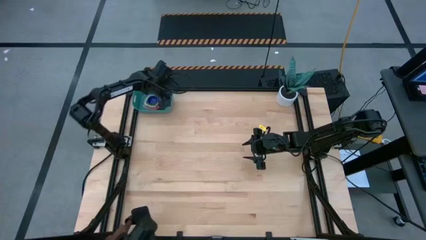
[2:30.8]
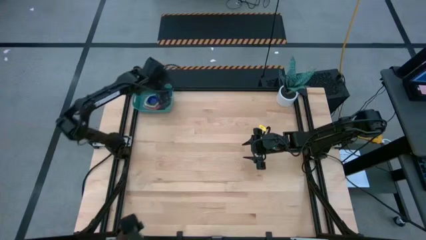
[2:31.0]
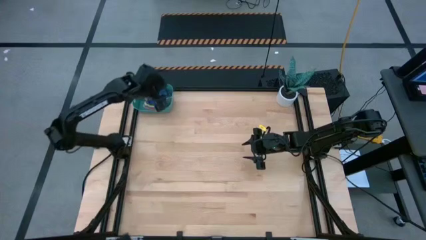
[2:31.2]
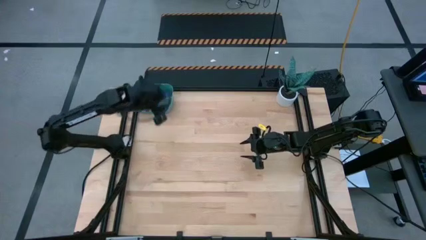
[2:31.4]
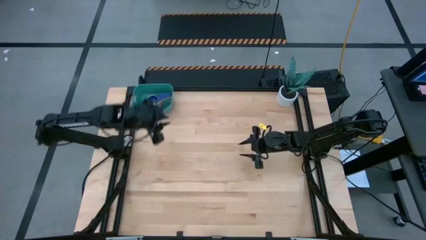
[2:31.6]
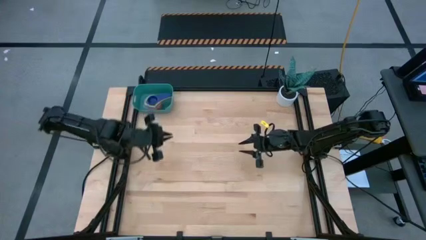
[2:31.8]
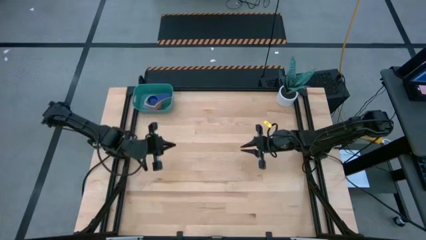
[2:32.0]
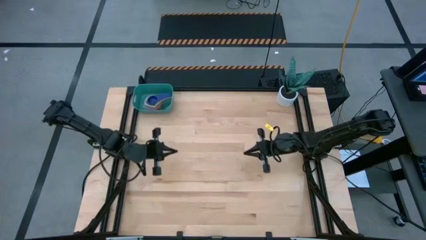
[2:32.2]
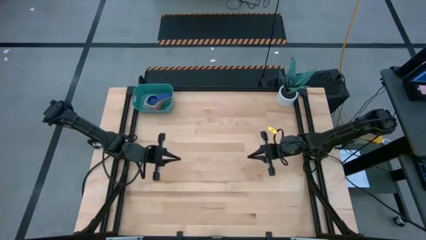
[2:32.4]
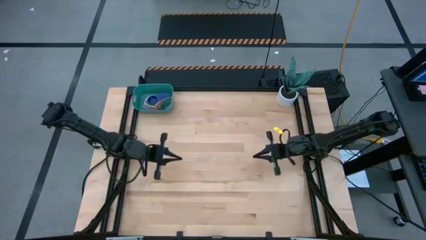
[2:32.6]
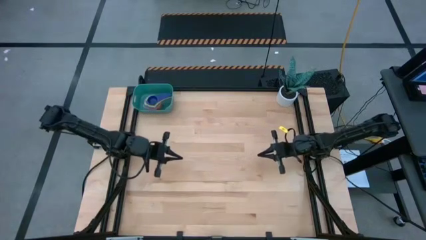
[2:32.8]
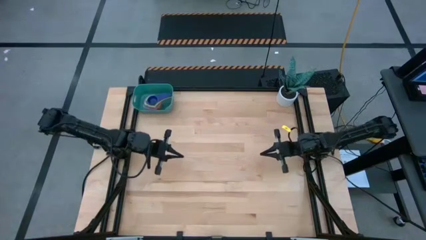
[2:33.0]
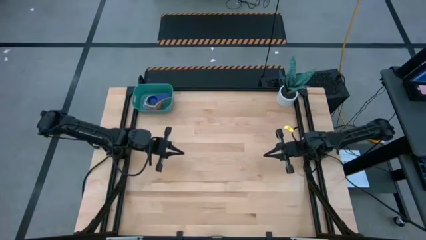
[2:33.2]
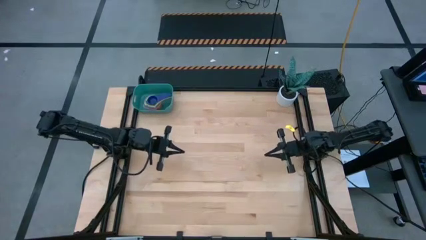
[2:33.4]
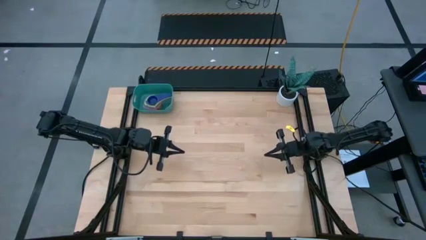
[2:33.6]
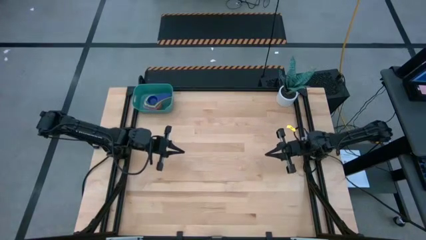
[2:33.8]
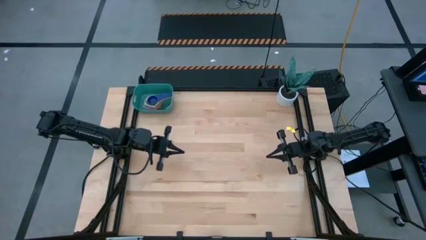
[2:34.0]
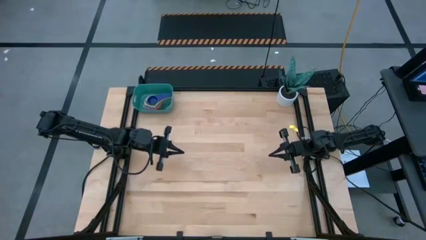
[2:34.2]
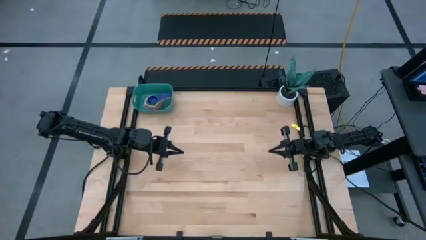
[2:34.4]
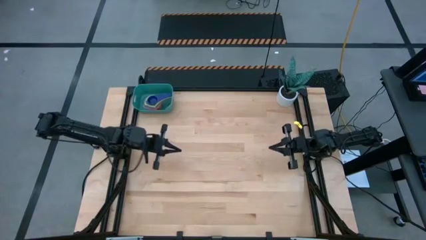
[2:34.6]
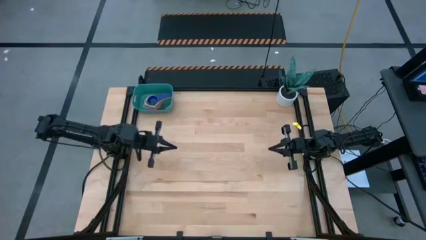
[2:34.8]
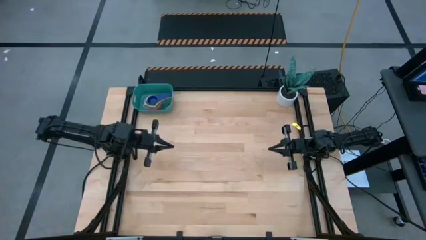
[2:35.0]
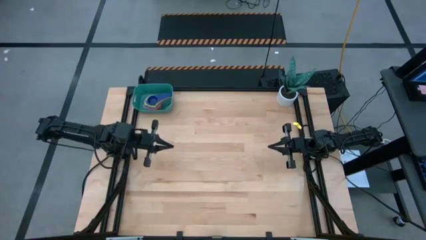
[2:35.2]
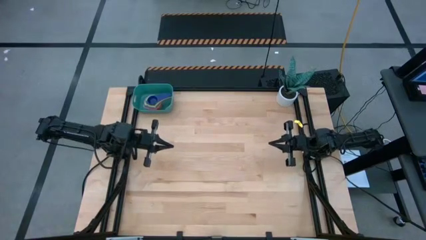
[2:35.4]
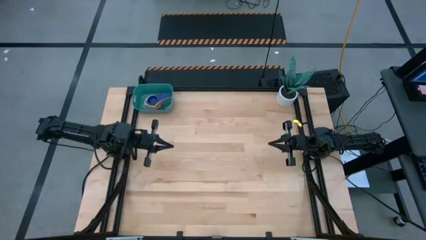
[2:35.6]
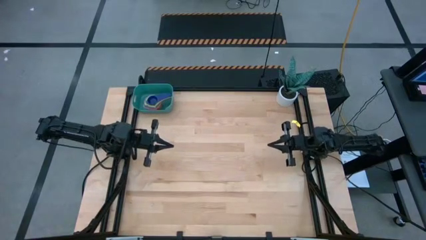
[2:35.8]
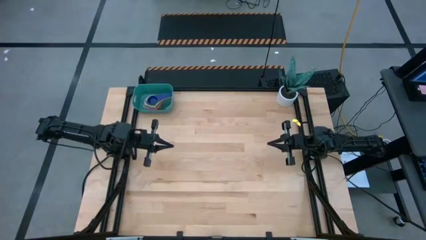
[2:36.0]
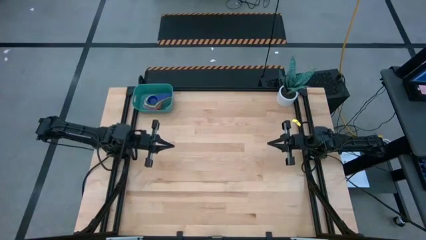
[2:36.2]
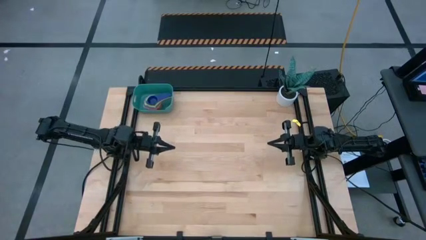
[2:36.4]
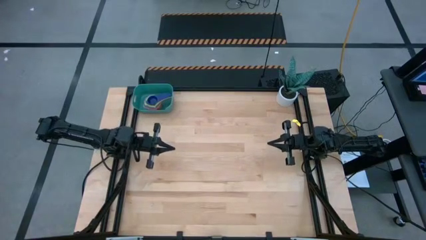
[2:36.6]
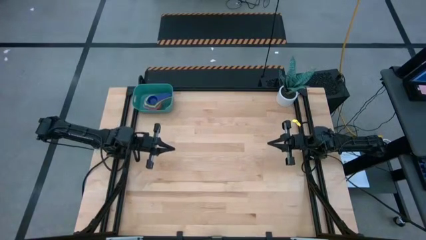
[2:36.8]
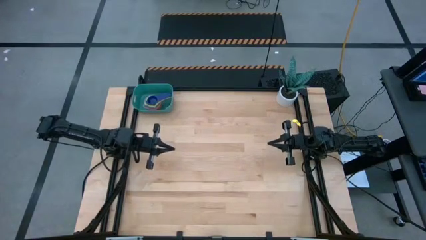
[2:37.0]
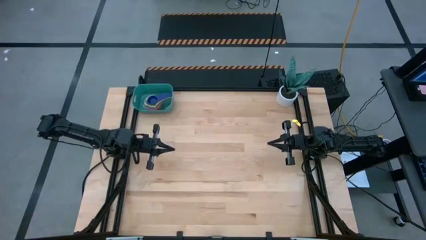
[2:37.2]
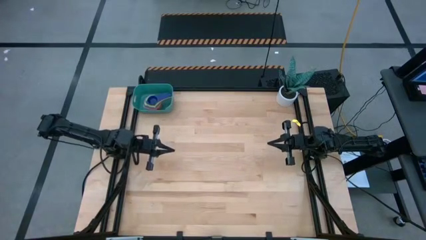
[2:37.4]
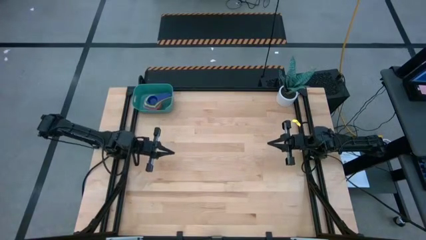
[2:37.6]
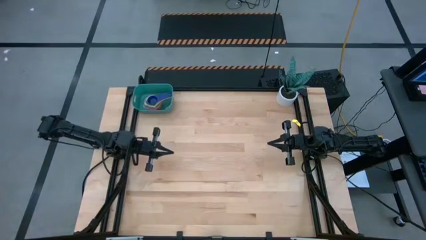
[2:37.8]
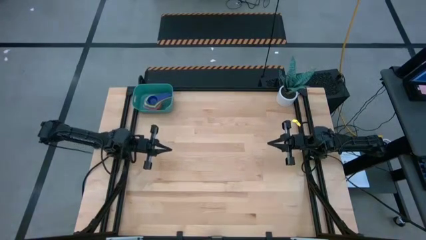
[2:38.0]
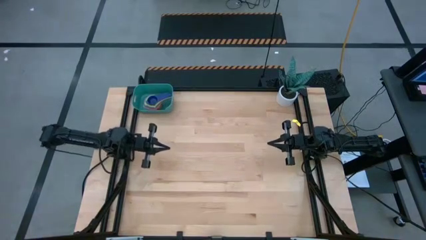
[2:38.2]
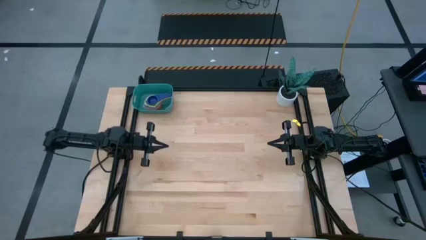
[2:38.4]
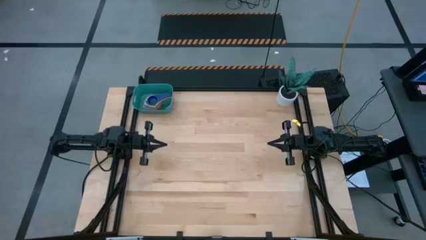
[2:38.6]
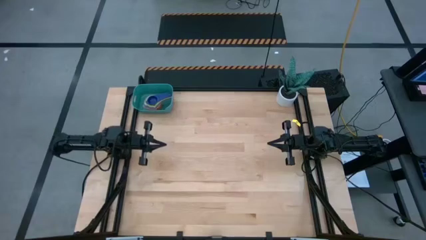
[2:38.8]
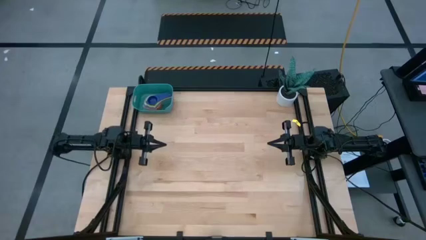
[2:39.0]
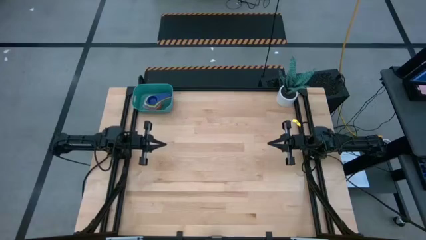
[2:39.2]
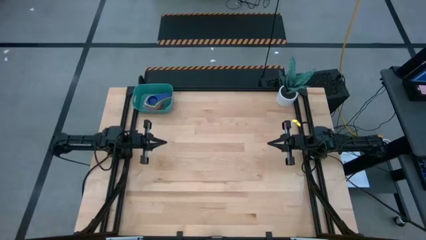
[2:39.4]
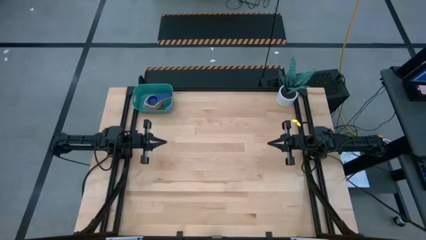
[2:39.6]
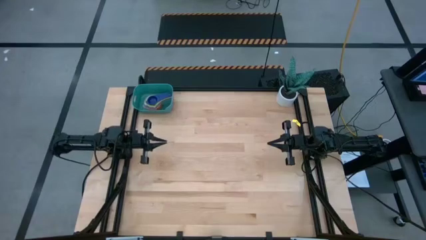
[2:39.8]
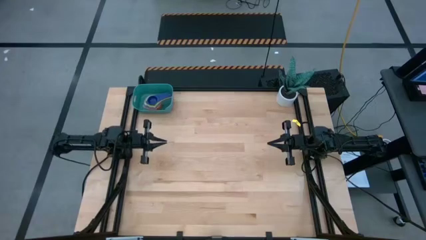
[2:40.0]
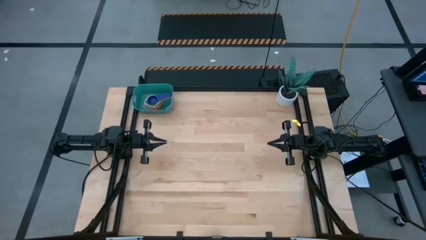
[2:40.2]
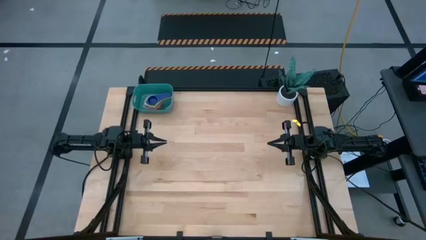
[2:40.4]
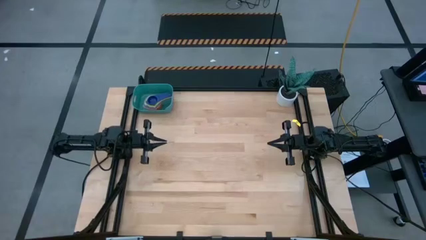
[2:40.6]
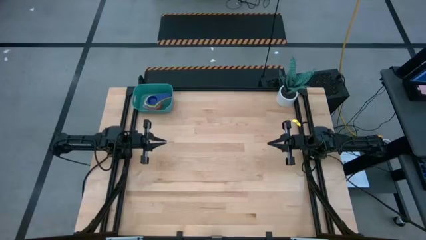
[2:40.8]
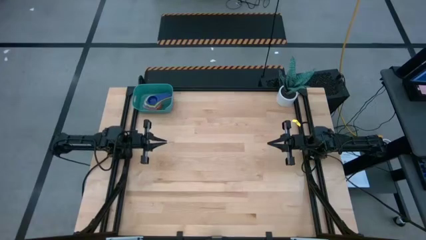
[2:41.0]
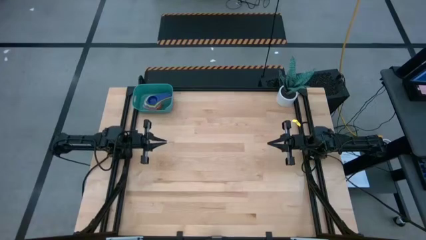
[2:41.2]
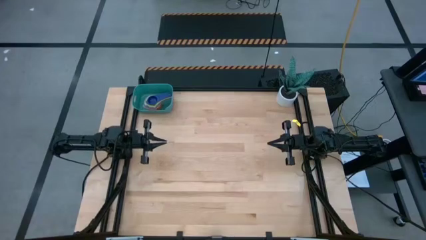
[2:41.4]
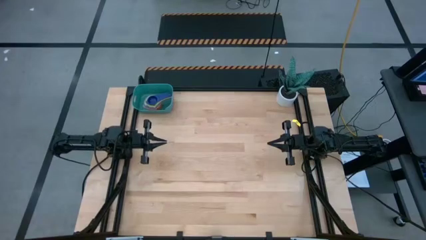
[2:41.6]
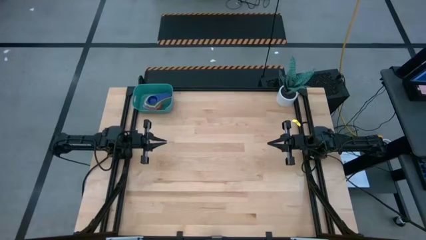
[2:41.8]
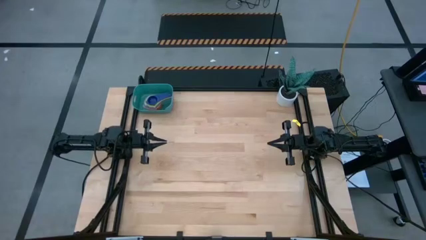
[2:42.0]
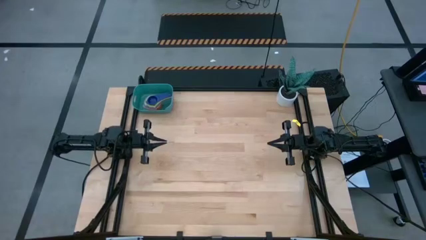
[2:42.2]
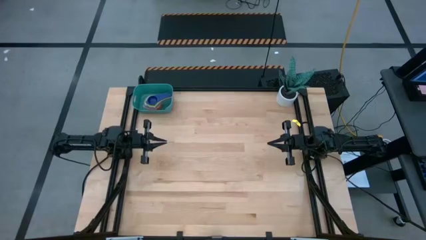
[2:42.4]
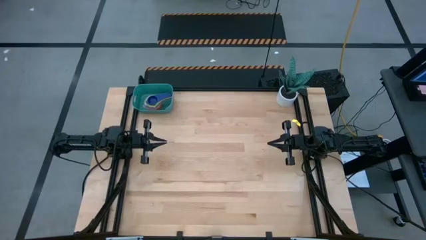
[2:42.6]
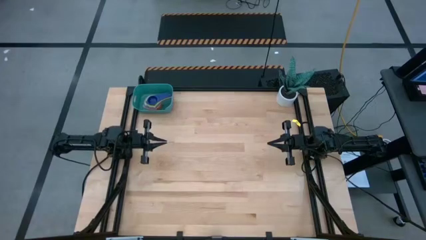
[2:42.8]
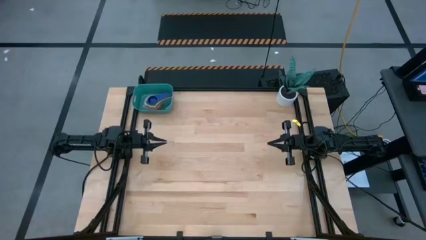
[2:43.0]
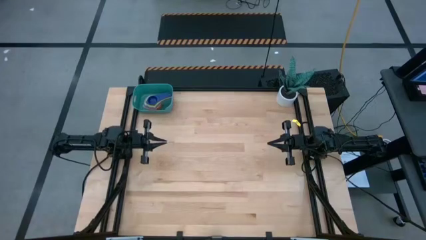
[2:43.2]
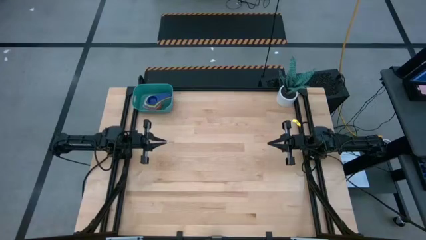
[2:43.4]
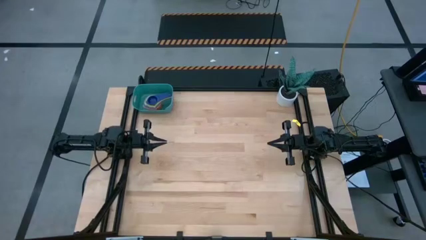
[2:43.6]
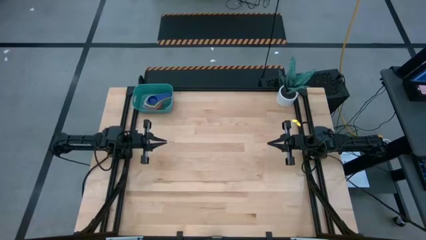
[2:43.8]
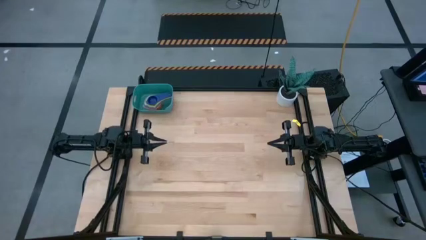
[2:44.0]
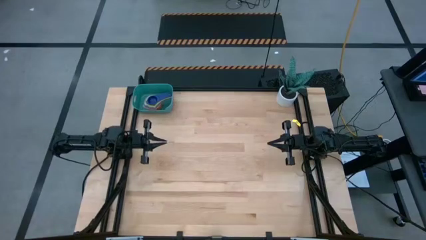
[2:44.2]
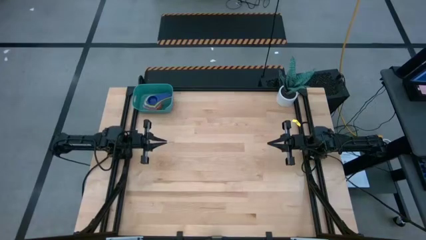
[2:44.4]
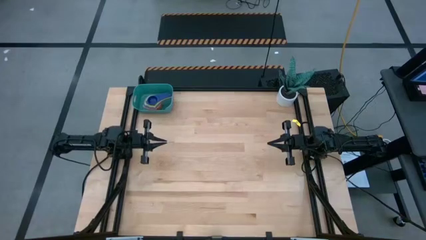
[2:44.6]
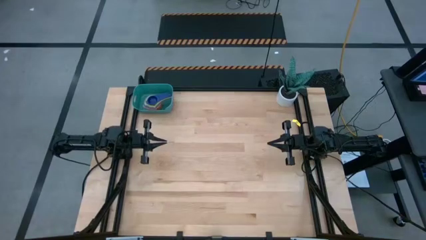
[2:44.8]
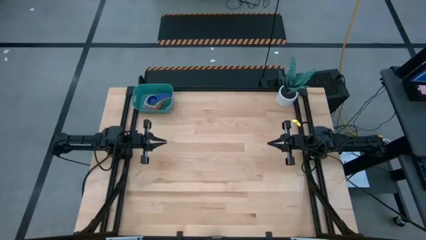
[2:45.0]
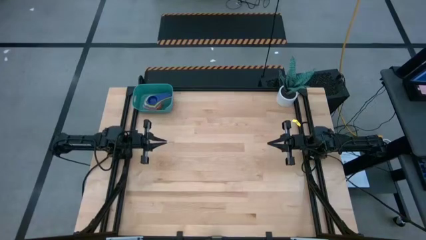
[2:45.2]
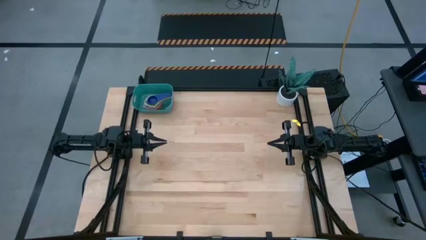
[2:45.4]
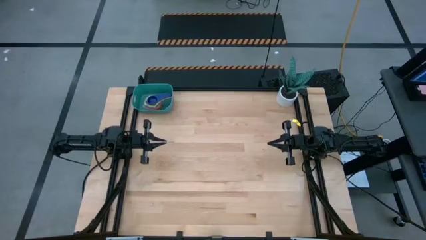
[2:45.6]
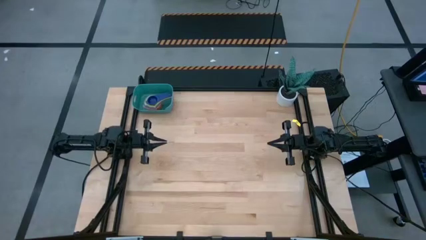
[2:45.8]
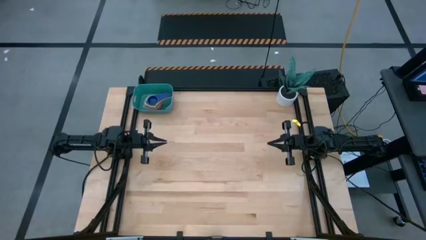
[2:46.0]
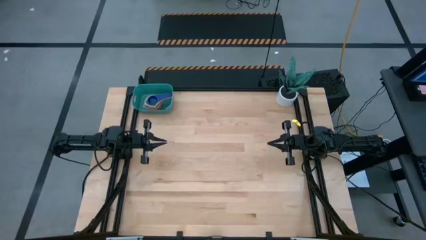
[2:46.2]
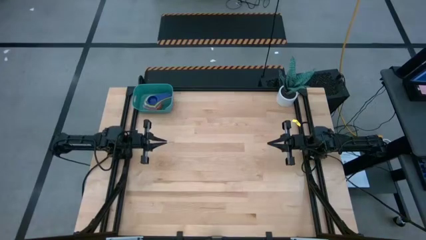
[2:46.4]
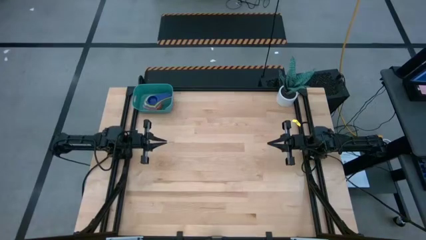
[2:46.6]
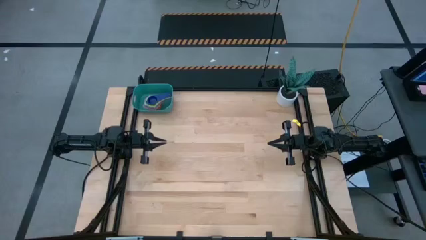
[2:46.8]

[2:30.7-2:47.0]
Task: Nest measuring cups in basket
Return to Home Position

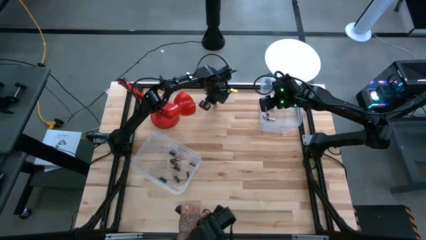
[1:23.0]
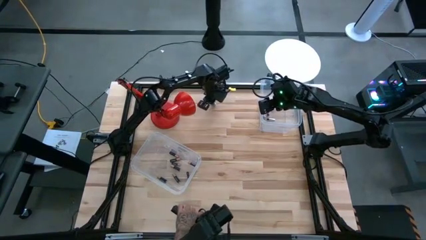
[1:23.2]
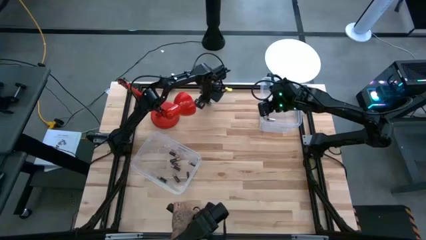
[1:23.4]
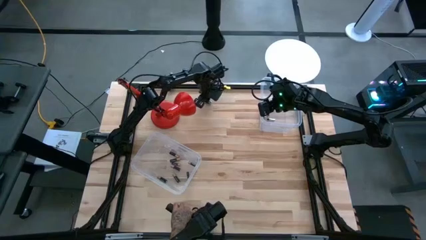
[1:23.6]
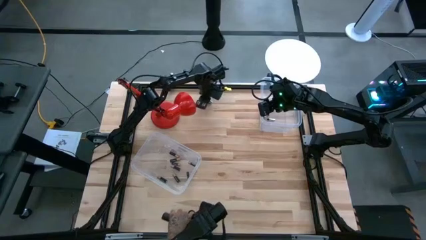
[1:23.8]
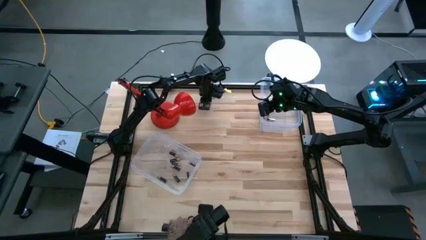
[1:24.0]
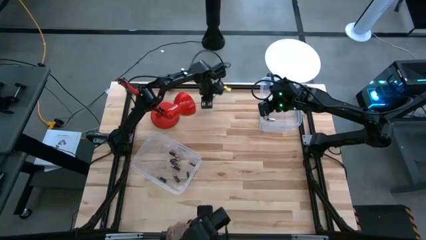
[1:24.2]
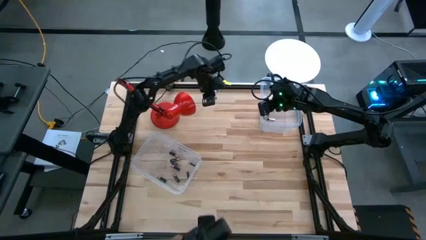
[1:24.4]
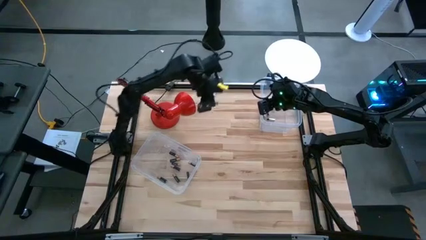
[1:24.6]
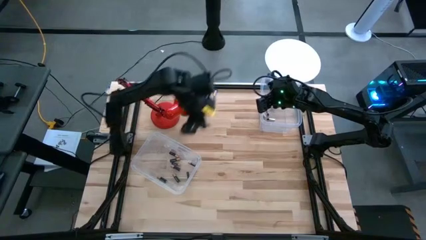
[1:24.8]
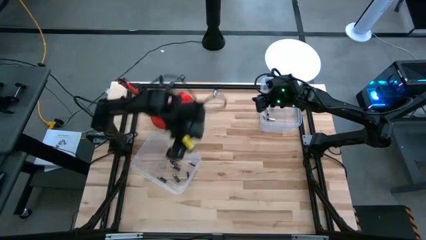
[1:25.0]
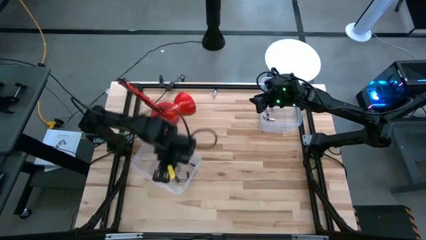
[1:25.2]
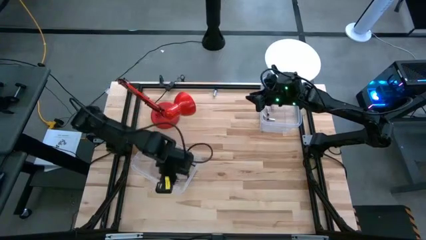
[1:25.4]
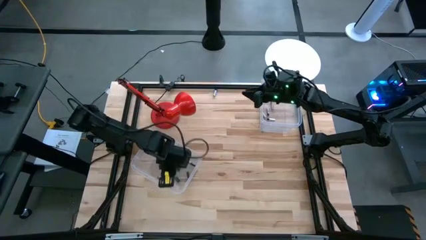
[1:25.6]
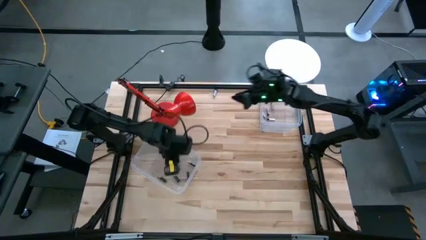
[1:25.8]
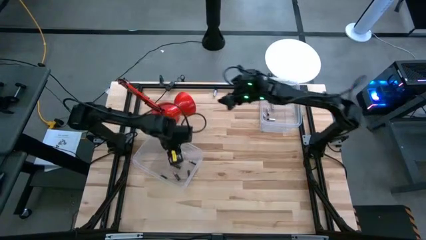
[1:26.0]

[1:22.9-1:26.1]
Task: Sort batteries
Put the silver battery into the top transparent bin
